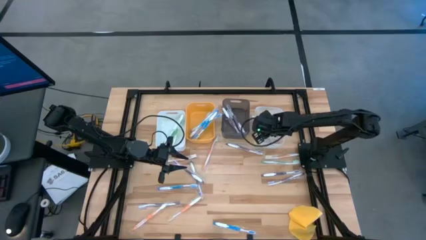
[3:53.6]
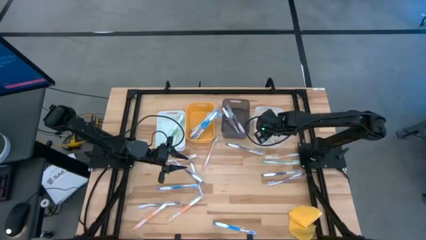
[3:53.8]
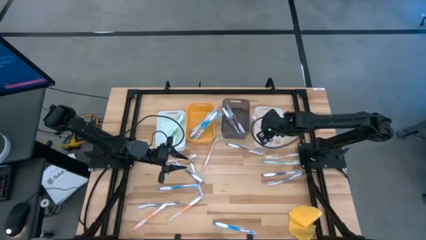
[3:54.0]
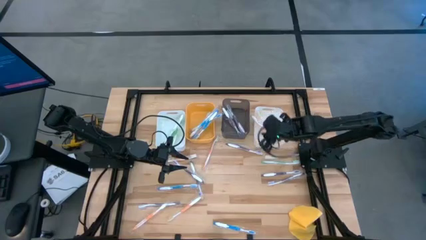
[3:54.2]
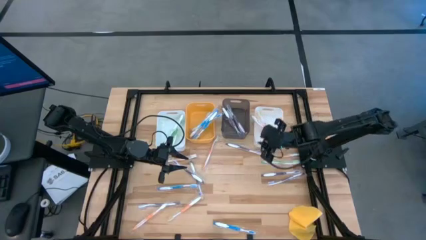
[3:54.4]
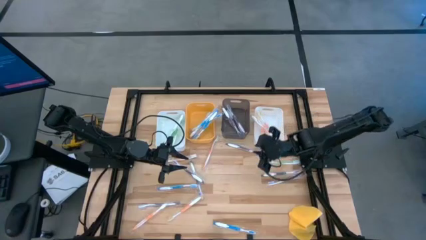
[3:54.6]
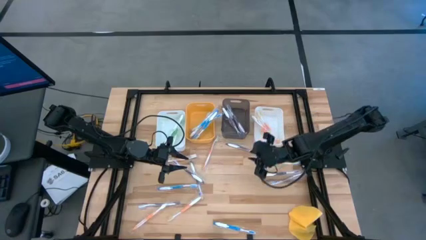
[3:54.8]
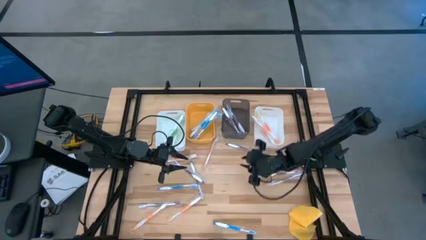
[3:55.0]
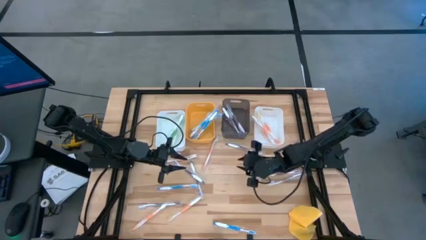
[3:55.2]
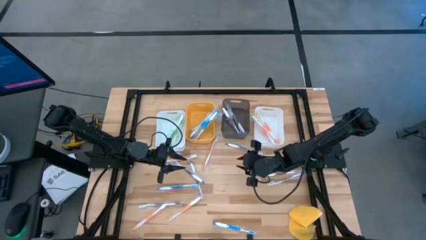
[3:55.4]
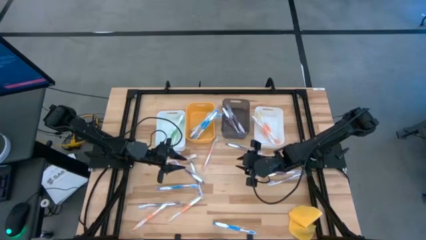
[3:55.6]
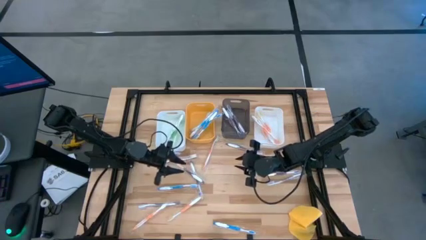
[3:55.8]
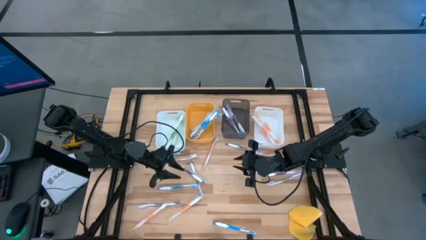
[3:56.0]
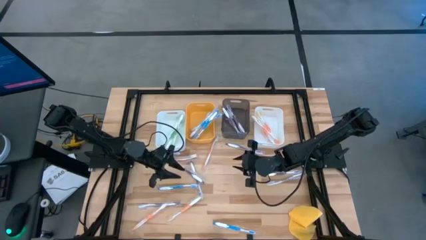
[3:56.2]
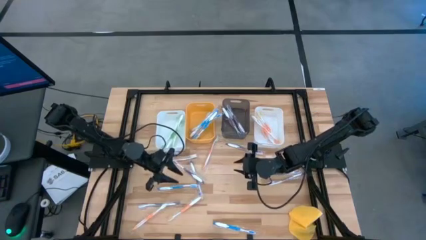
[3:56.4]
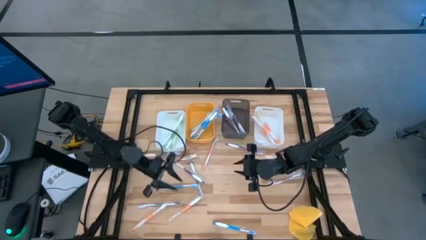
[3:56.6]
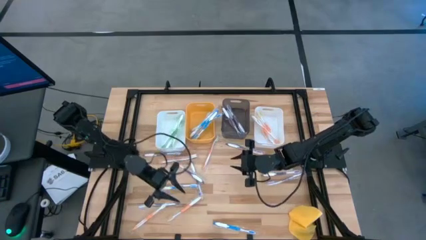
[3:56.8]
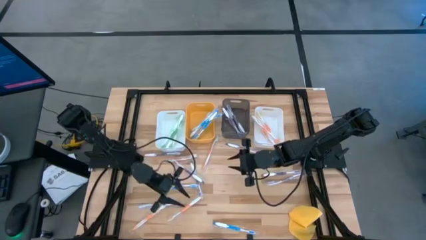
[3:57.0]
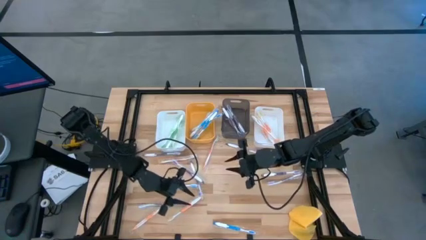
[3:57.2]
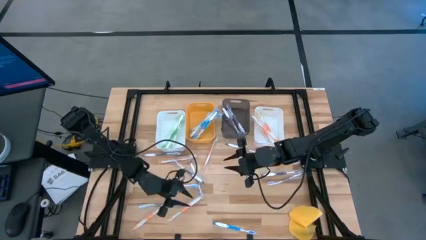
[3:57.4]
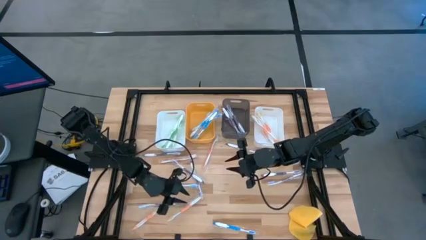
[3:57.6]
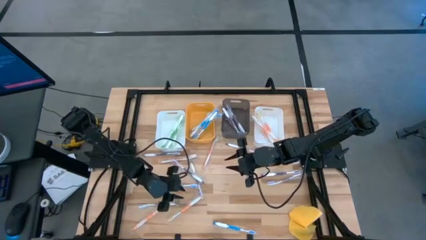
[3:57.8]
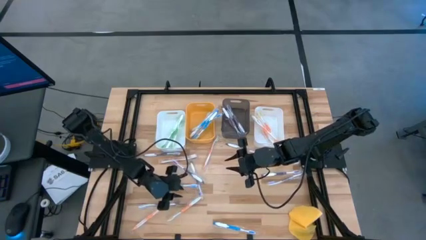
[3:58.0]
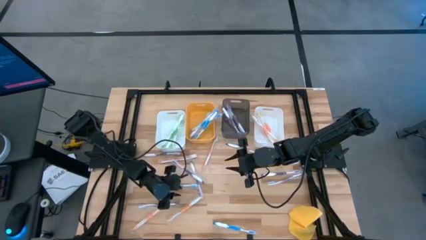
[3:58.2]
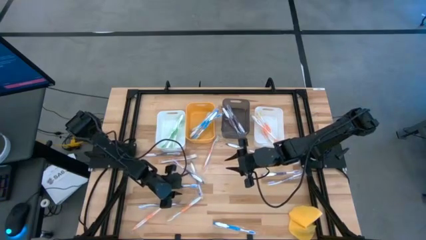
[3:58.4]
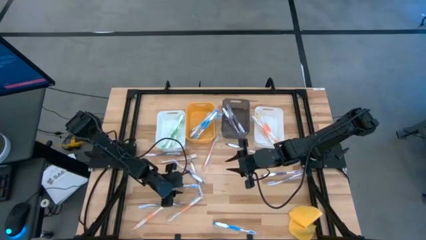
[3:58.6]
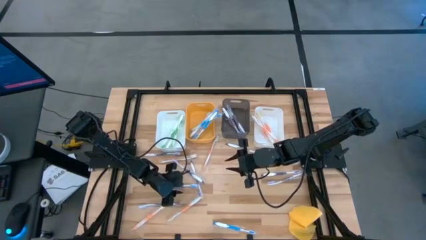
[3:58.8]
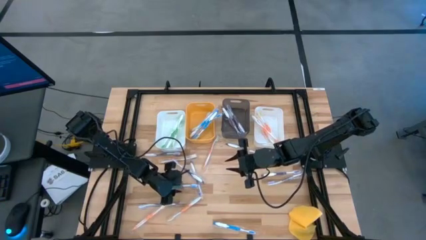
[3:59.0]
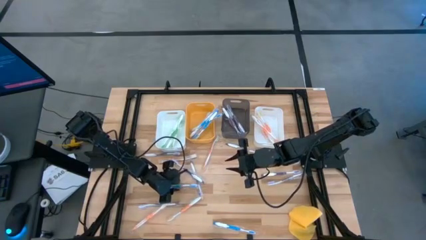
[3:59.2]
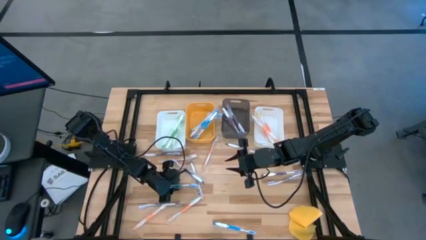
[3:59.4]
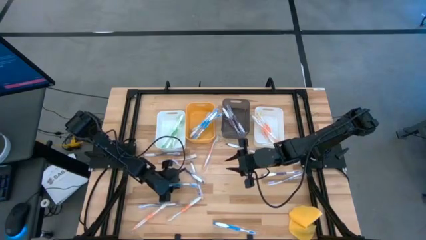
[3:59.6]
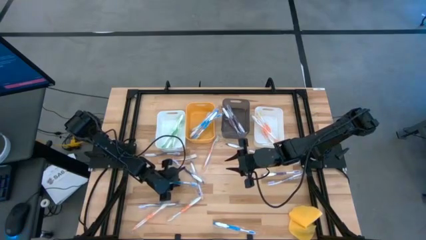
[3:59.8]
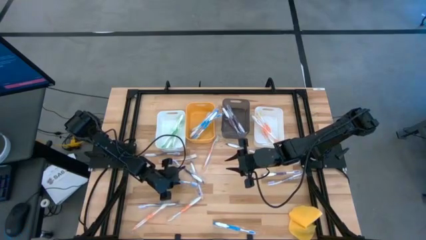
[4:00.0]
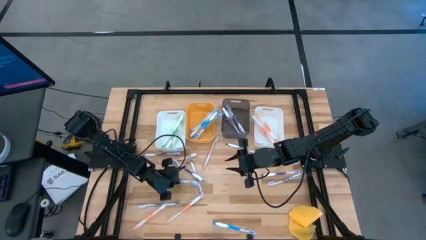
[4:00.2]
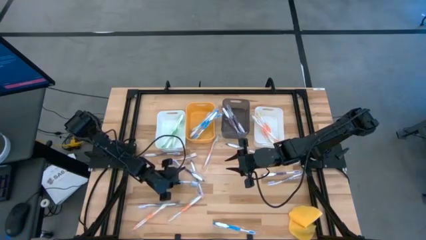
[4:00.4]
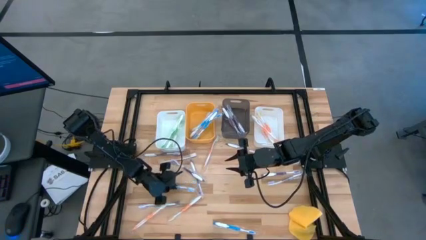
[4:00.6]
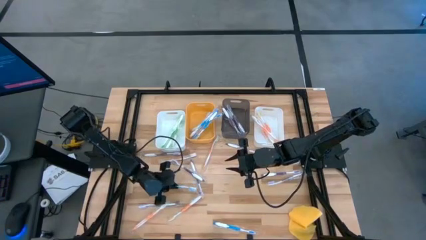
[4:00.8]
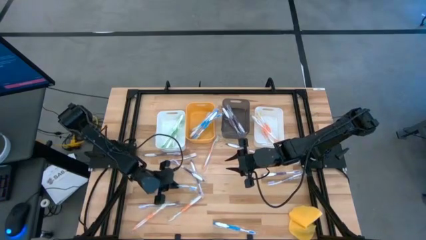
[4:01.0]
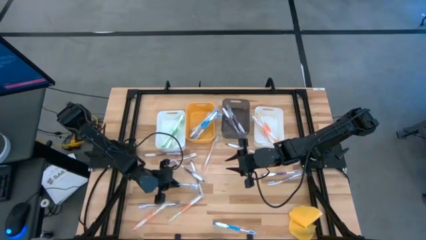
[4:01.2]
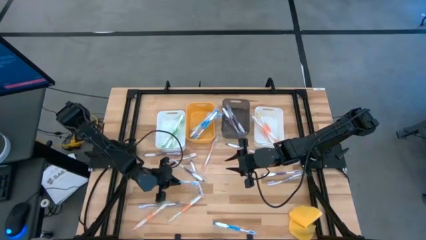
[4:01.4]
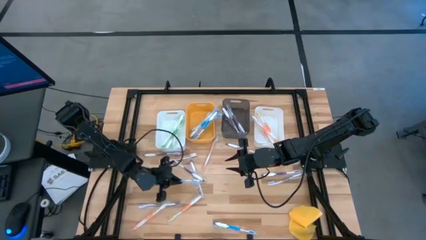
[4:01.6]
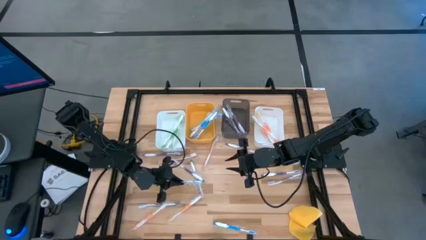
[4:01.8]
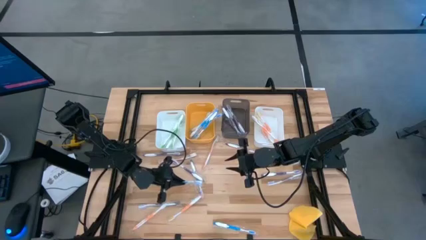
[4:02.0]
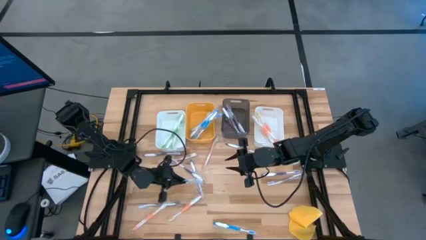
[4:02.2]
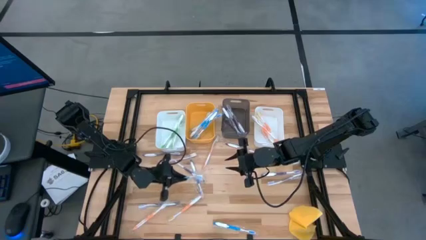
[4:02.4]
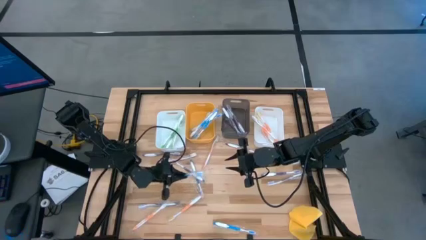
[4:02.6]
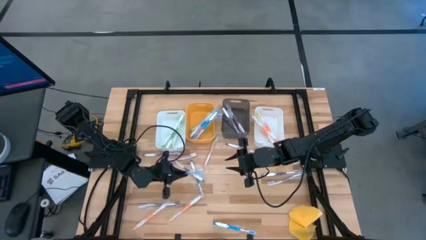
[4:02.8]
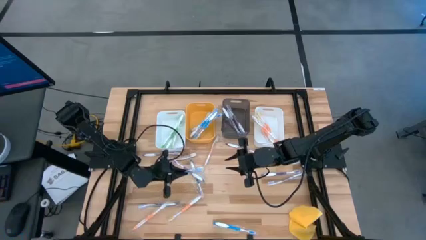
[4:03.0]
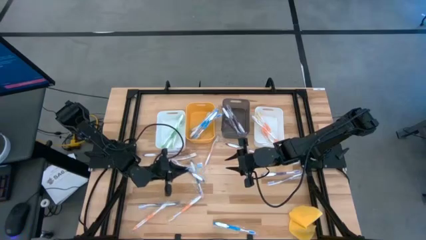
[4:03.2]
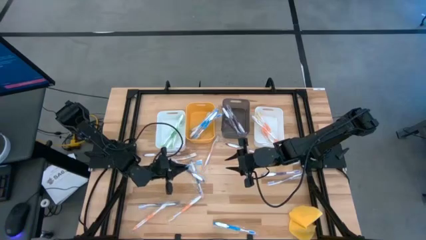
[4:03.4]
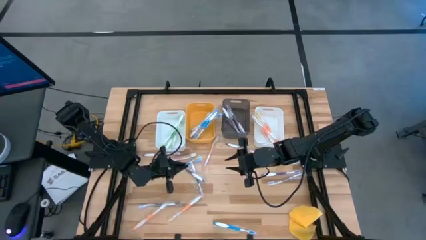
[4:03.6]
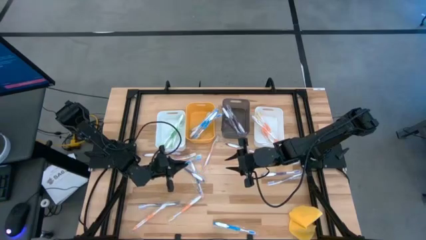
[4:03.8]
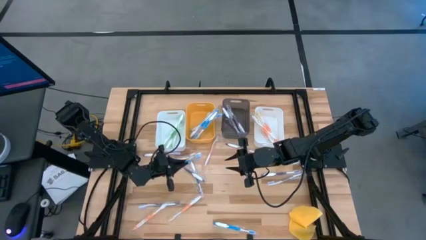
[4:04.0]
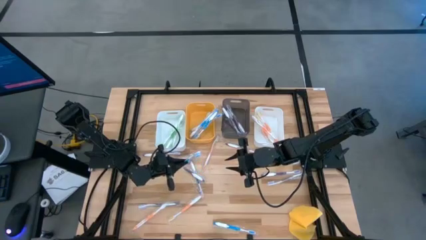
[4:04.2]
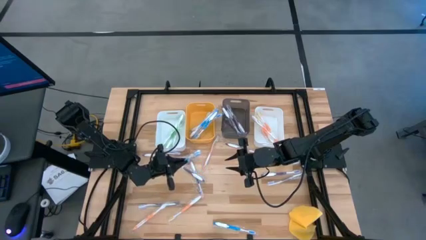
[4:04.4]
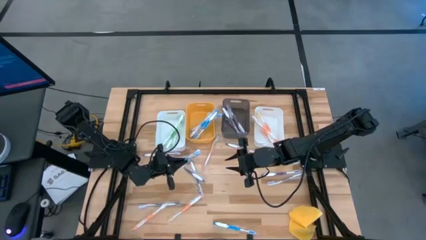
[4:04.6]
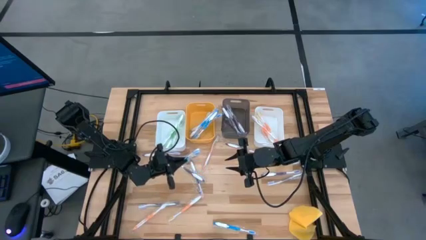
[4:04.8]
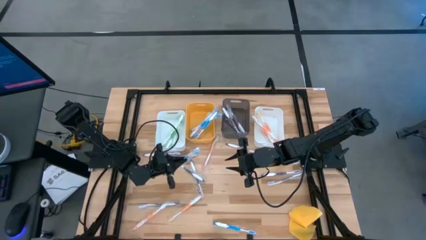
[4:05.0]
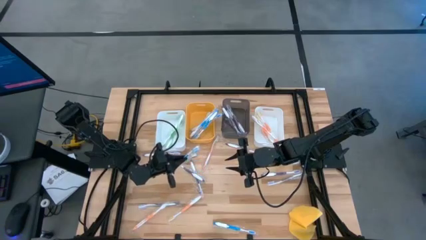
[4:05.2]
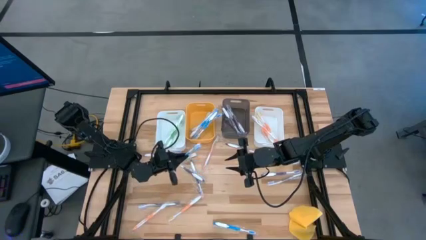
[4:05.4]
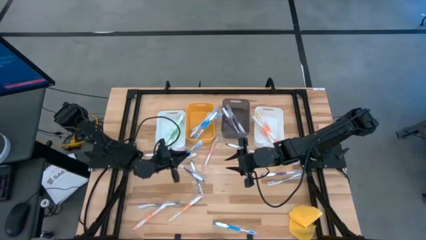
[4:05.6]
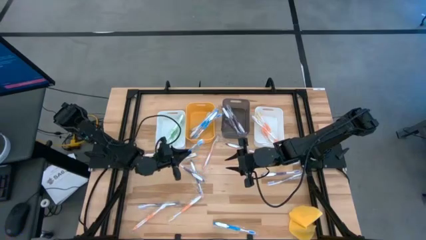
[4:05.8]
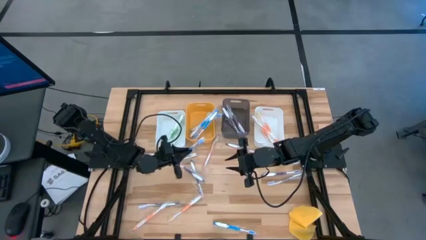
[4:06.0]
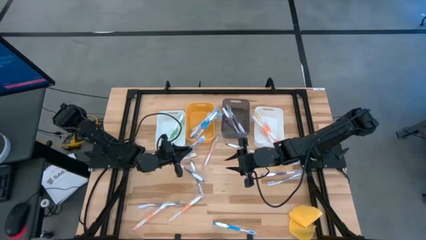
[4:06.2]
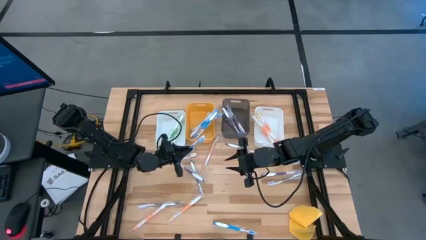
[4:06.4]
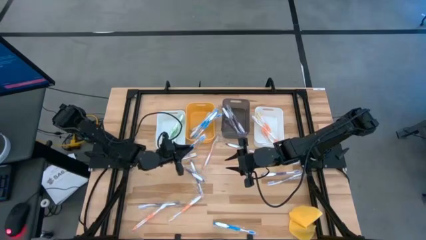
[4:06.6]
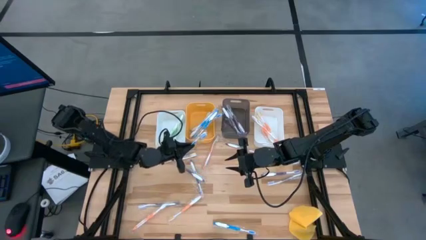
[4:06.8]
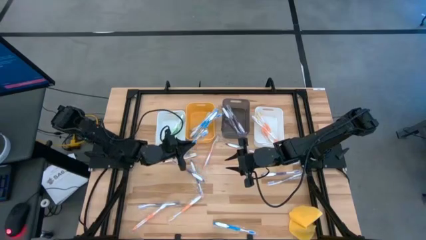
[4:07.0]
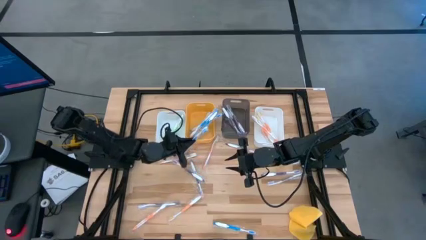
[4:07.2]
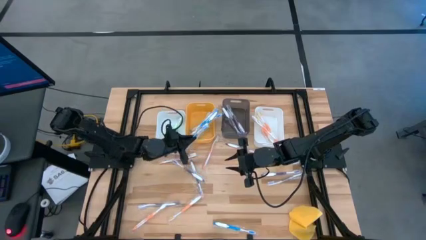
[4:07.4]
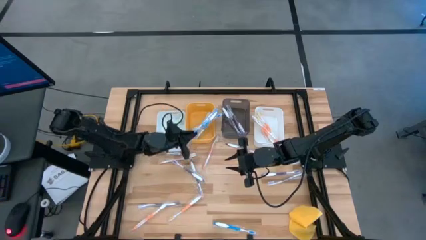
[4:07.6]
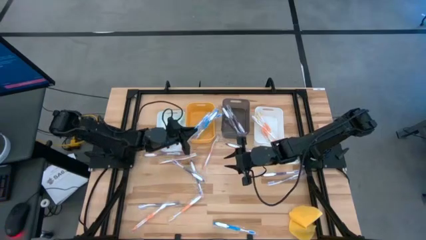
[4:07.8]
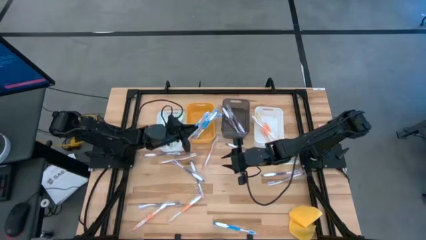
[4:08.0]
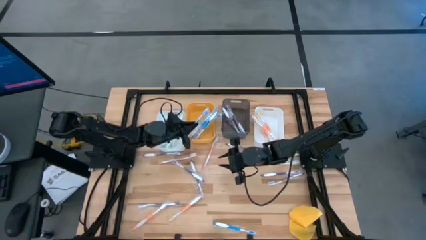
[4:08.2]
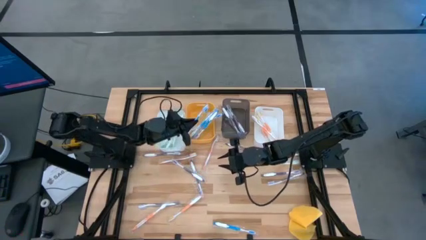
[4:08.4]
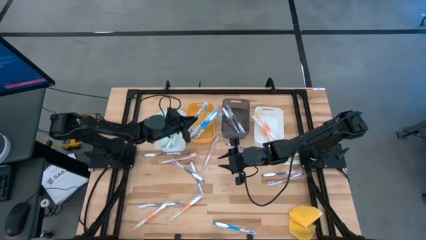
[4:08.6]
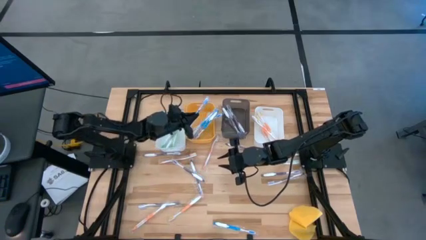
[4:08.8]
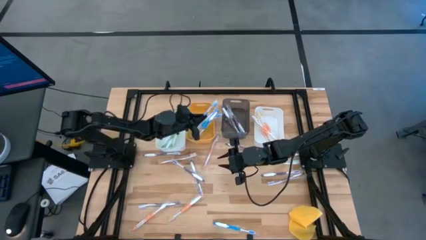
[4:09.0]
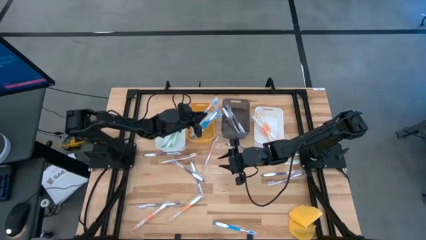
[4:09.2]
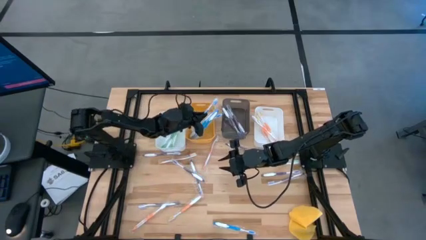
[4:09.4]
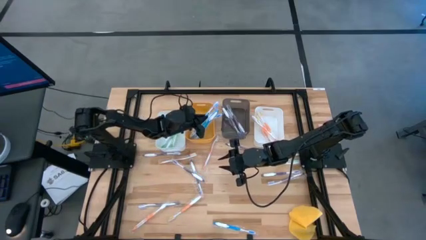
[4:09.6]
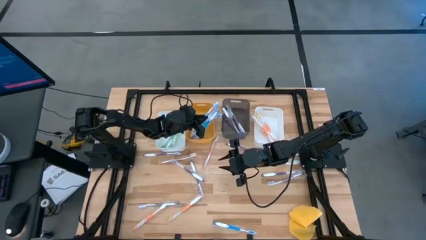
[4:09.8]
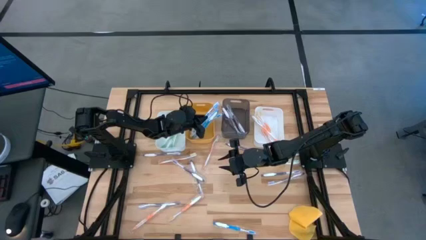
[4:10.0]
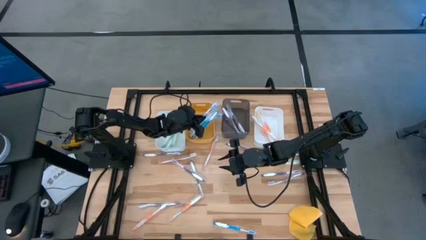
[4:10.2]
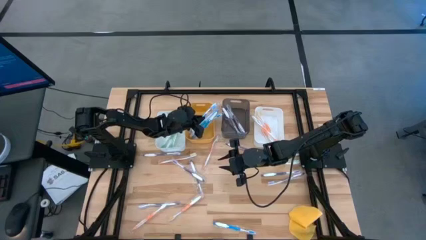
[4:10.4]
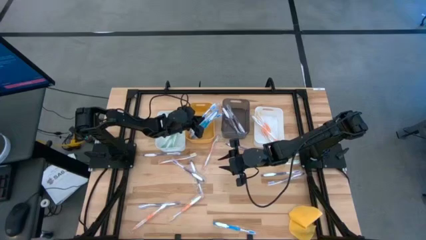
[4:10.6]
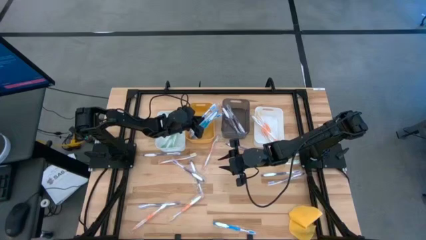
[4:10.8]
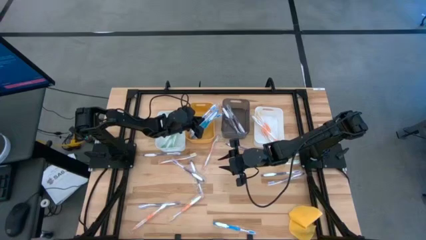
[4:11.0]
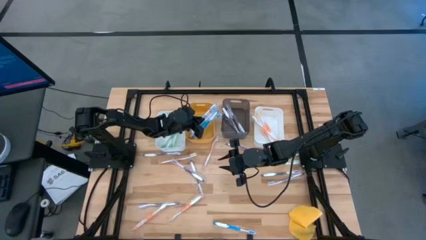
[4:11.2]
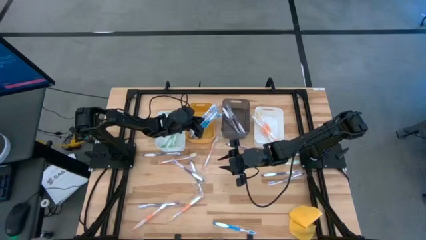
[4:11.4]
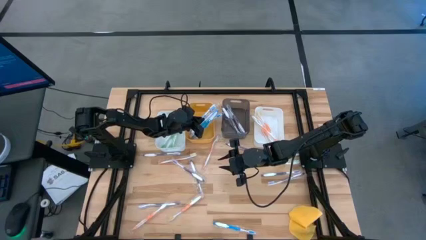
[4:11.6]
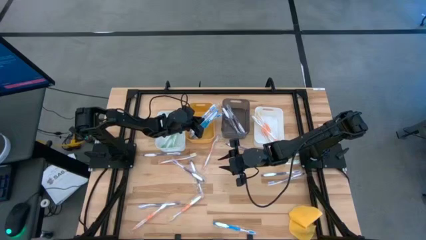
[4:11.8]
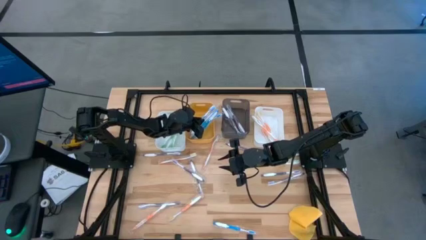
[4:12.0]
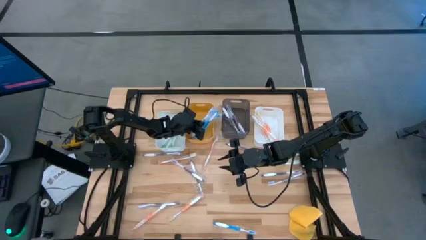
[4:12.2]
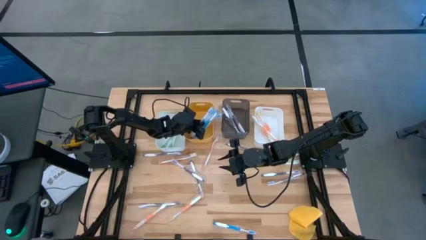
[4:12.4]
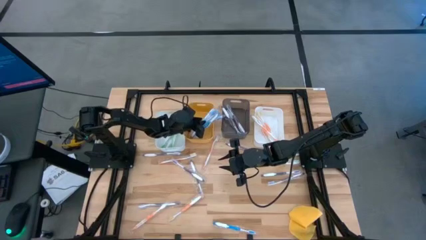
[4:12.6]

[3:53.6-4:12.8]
Task: Pick & Place Toothbrushes
Put the top blue toothbrush into the orange bin
